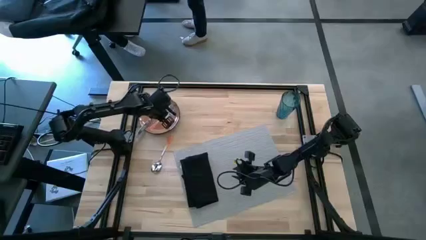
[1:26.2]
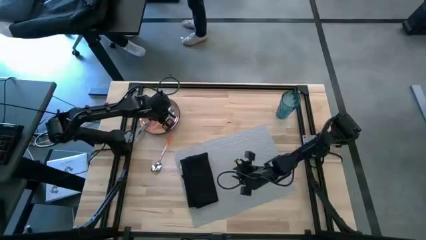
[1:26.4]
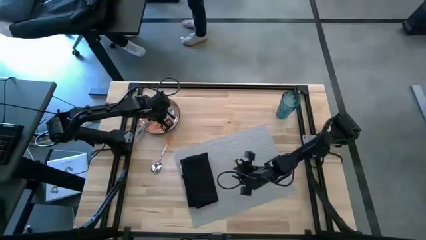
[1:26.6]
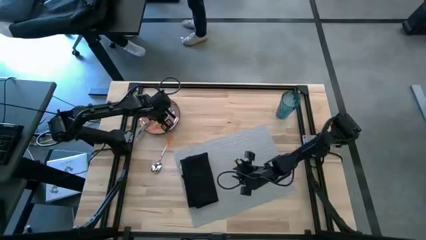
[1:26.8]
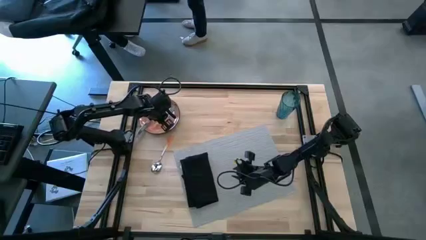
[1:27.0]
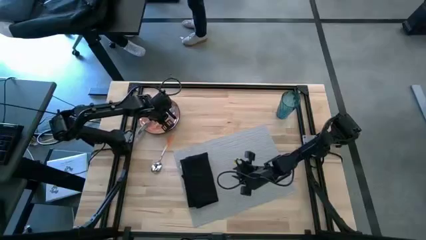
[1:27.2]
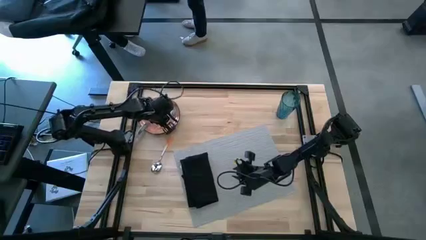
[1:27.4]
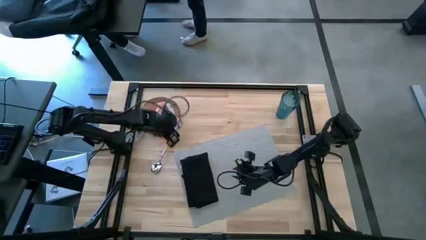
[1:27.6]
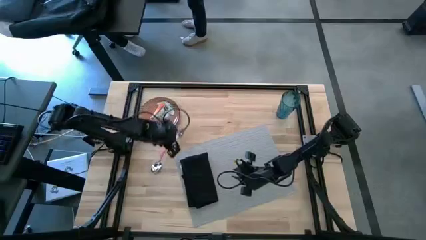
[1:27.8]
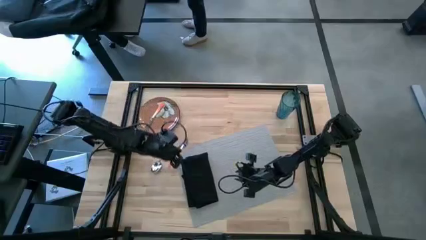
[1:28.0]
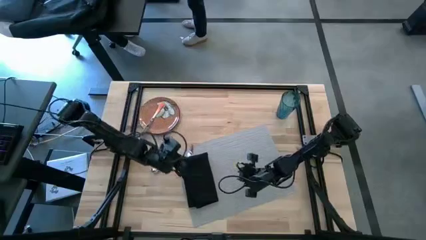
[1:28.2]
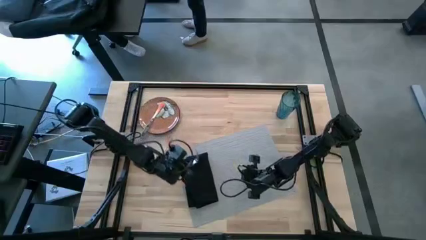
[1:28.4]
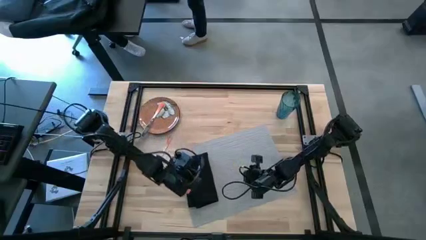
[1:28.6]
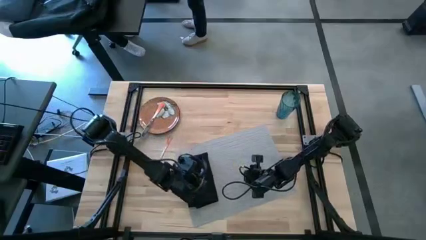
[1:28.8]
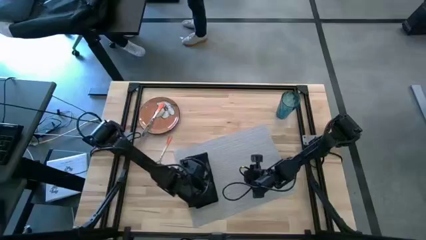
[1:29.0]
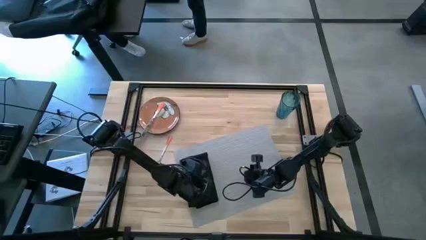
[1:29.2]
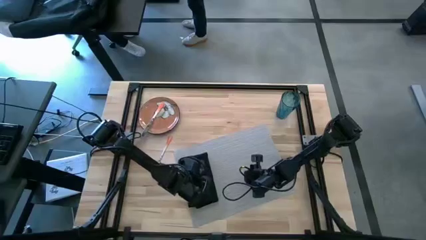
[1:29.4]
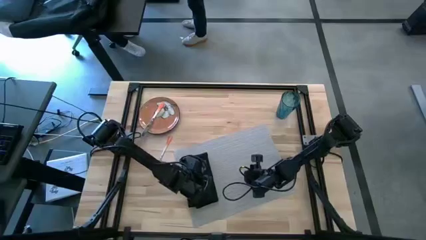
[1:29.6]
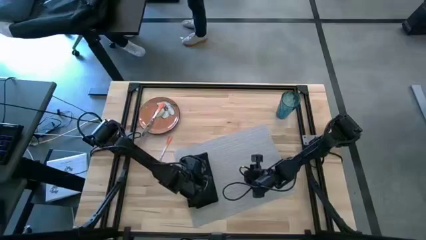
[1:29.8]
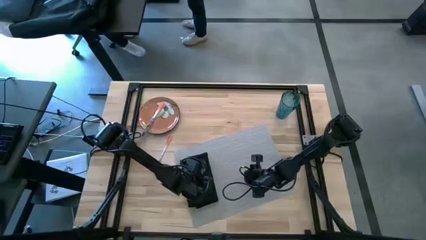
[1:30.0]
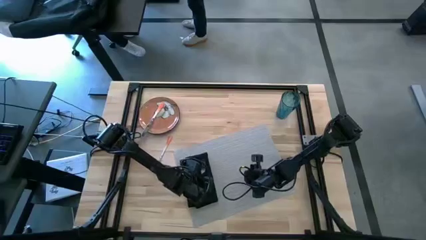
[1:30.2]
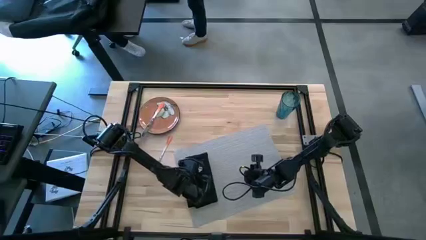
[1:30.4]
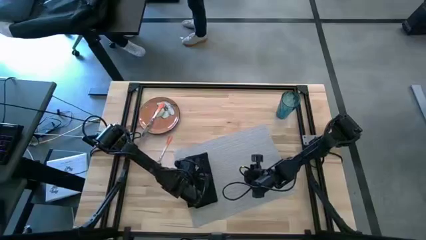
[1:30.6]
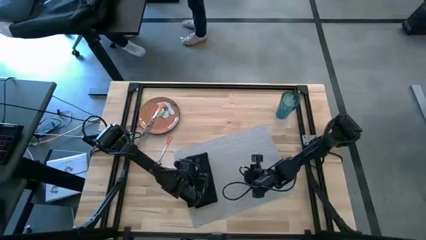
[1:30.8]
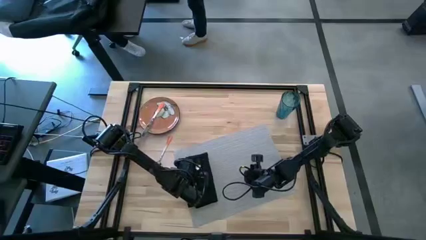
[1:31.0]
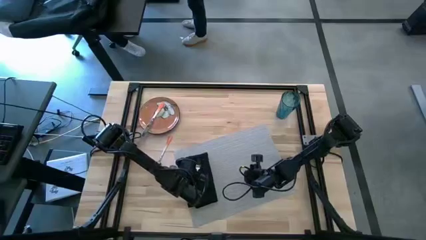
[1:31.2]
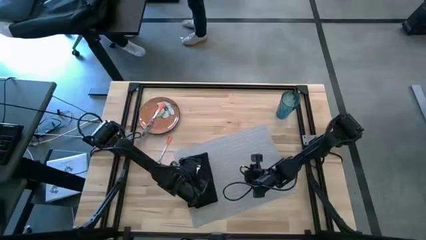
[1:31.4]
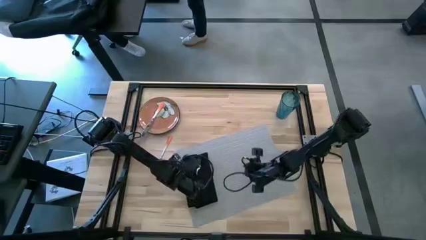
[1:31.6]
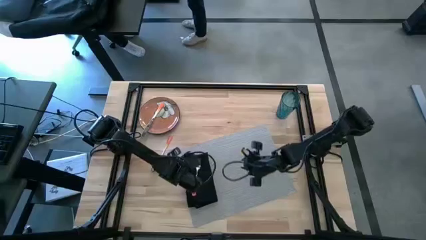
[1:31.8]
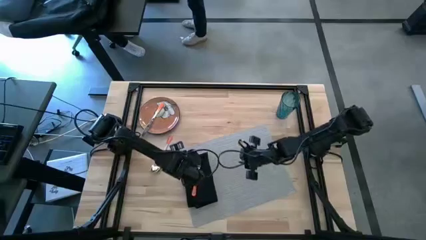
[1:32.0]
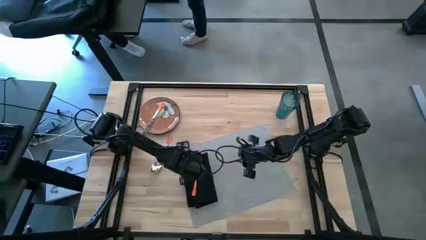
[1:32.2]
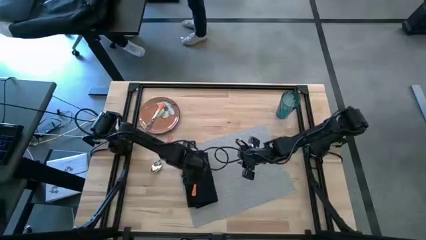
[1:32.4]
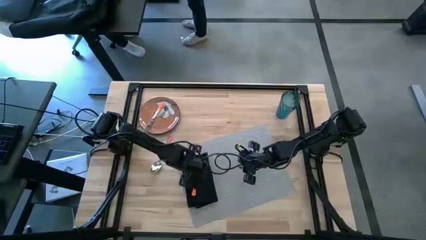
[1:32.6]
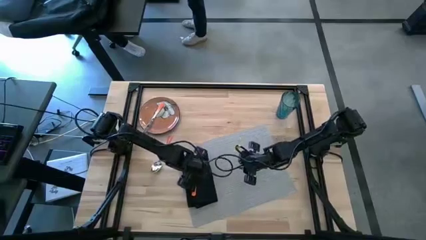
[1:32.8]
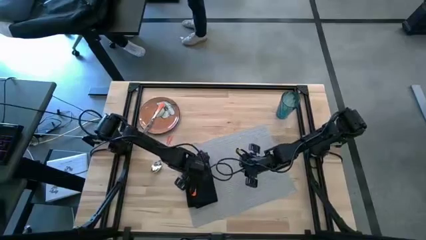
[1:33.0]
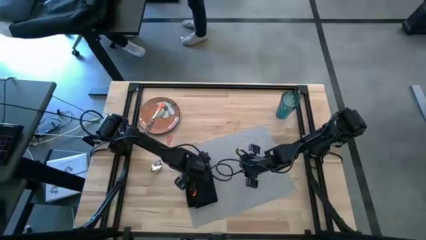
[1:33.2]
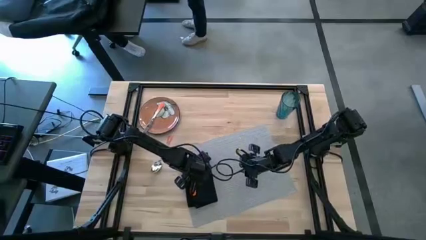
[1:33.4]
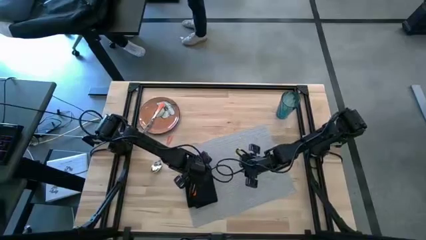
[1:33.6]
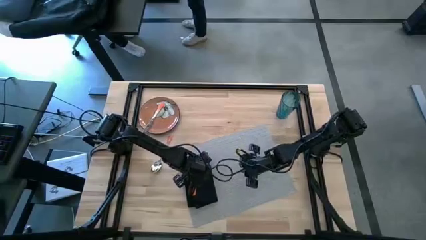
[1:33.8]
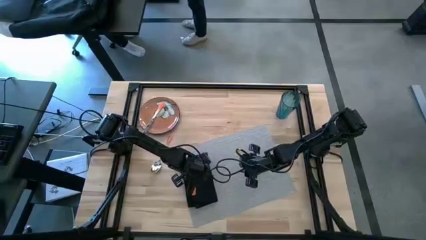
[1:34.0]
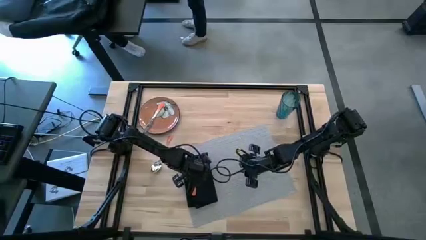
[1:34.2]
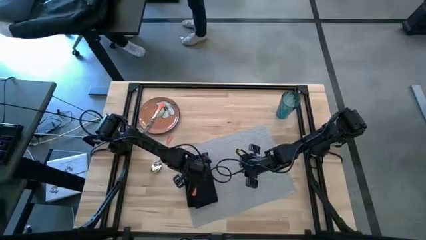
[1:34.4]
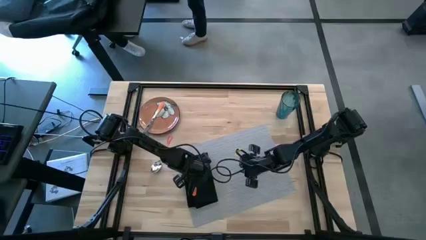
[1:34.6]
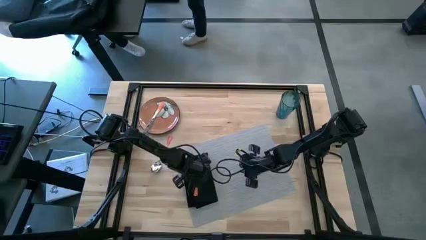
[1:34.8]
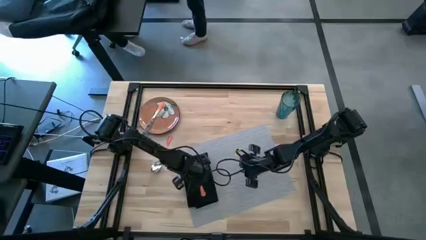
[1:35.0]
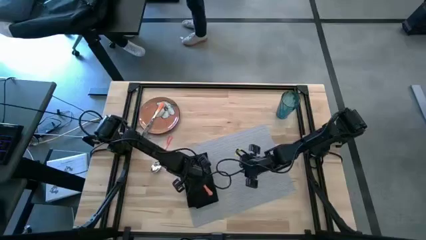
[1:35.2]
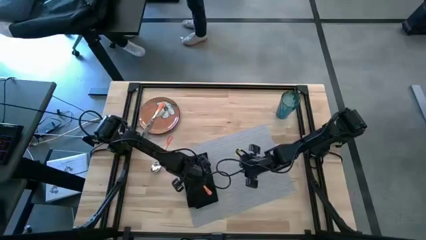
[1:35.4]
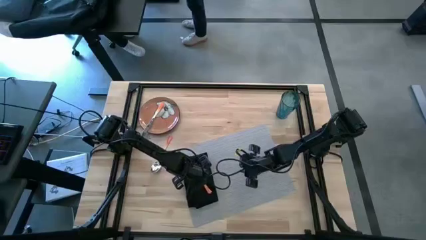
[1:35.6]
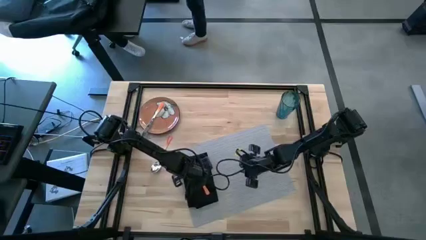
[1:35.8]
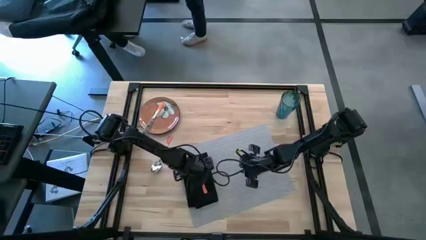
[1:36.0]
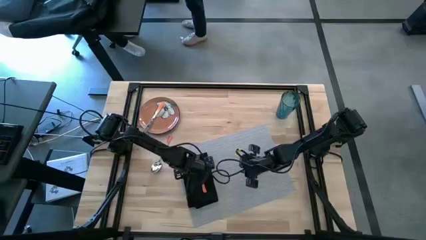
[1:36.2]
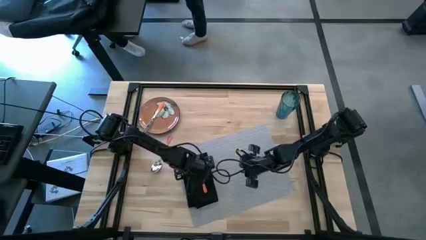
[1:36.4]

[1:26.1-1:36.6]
Task: Set table place
Put the orange fork on the black napkin

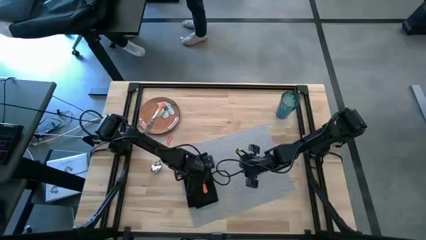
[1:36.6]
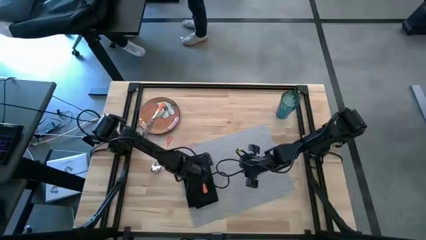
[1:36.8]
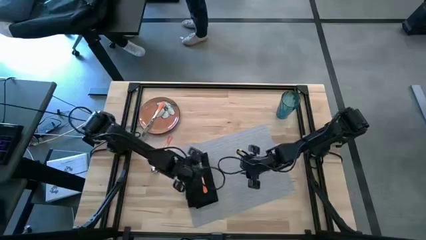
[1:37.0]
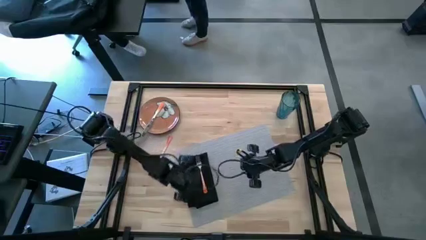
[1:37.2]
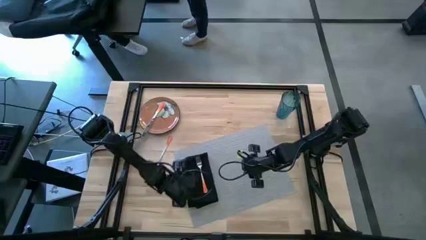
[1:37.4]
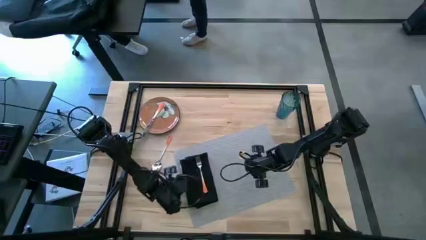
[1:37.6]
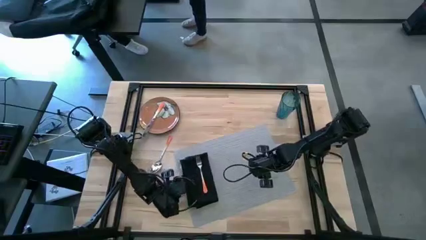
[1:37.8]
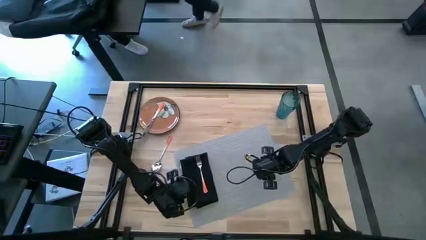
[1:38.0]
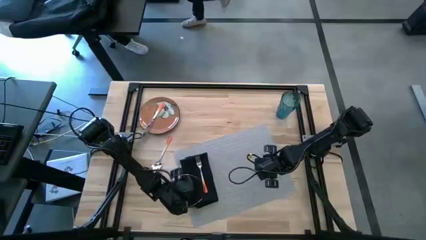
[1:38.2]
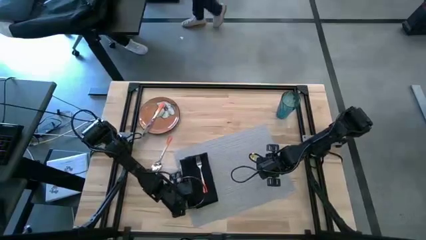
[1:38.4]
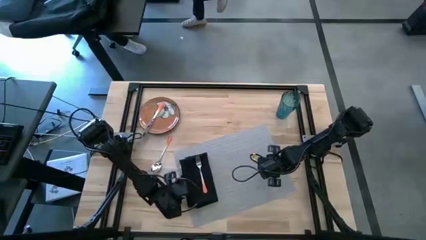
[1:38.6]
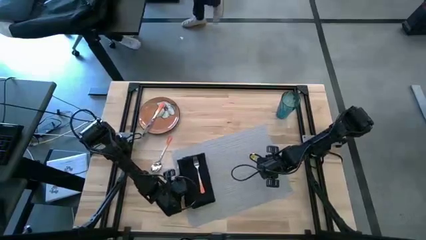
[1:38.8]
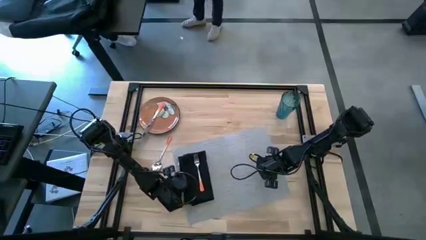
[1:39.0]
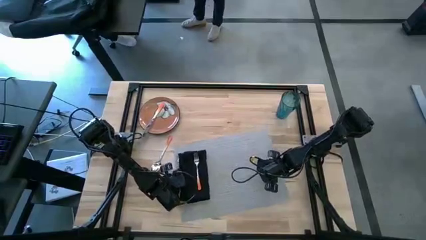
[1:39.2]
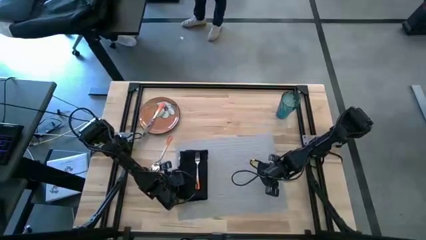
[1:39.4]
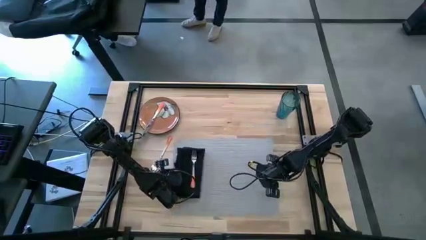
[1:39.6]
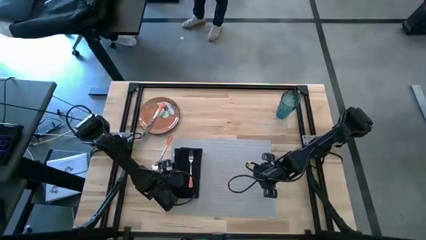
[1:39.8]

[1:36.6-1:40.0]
Adjust the gray placemat

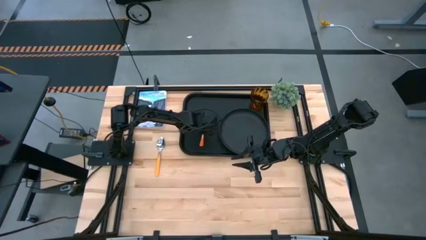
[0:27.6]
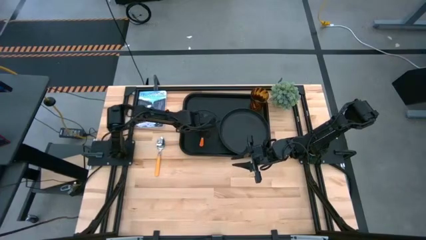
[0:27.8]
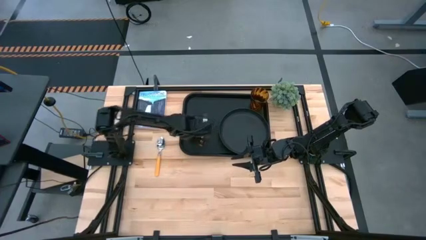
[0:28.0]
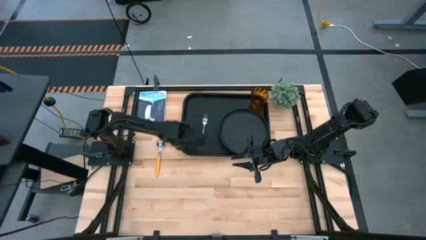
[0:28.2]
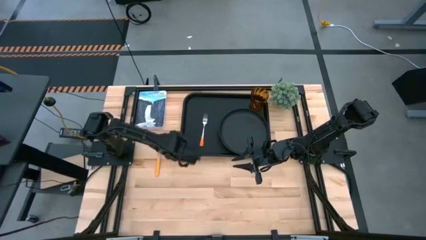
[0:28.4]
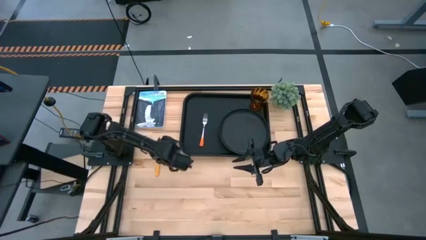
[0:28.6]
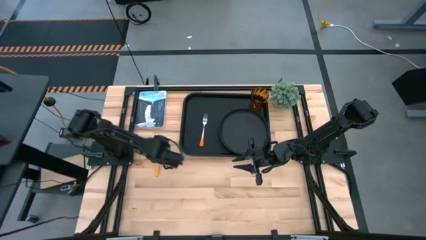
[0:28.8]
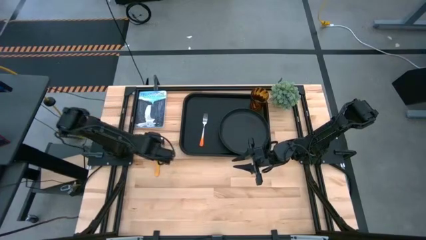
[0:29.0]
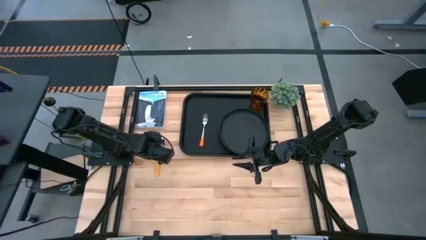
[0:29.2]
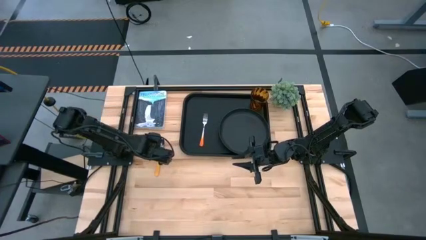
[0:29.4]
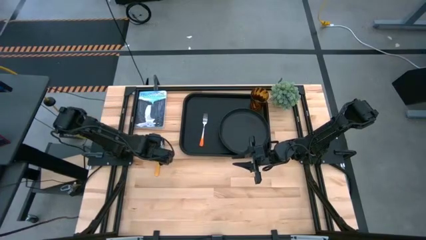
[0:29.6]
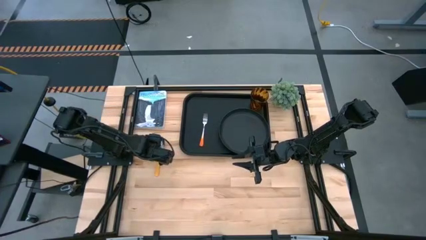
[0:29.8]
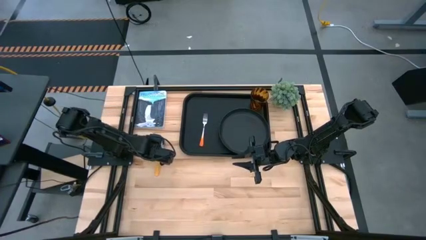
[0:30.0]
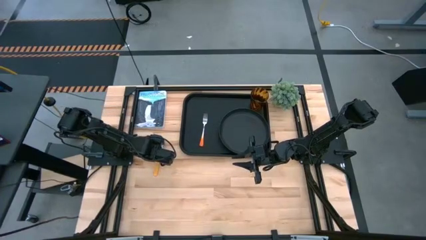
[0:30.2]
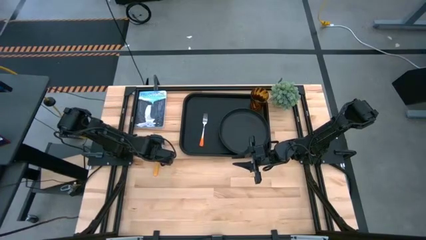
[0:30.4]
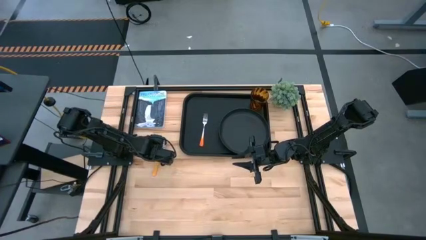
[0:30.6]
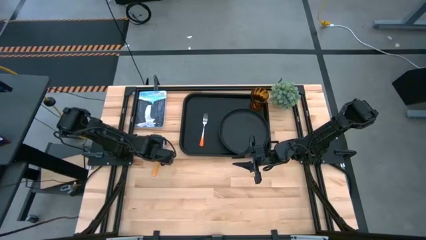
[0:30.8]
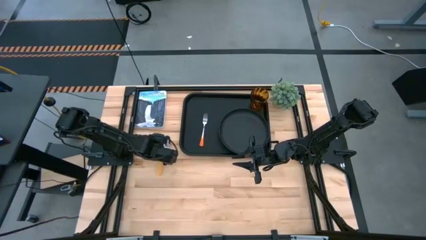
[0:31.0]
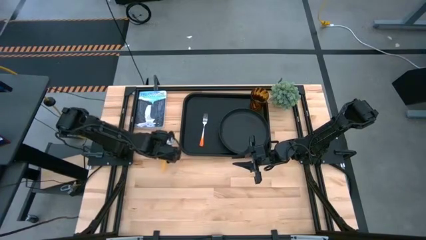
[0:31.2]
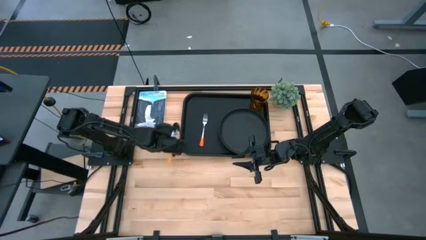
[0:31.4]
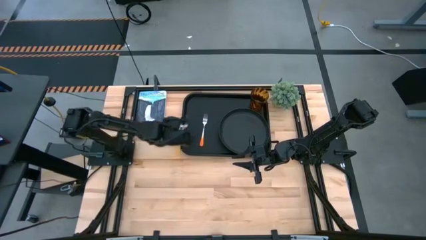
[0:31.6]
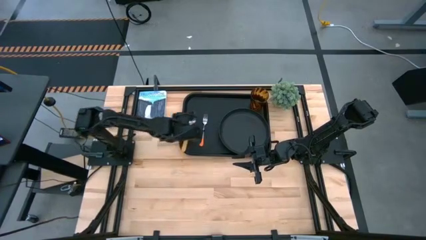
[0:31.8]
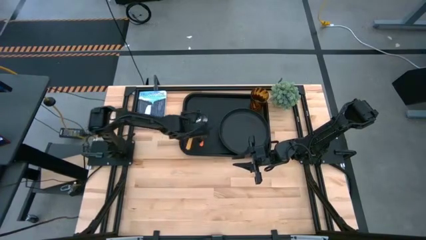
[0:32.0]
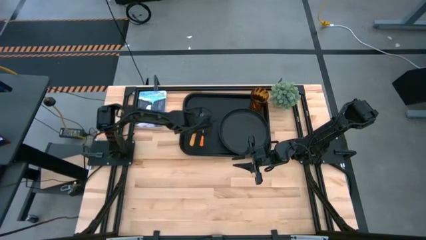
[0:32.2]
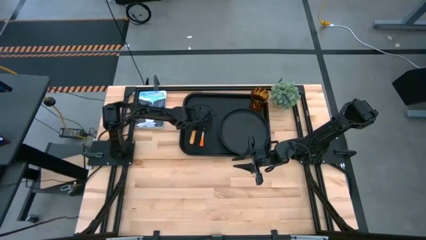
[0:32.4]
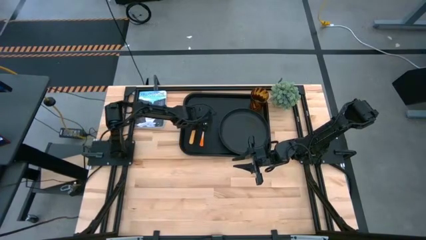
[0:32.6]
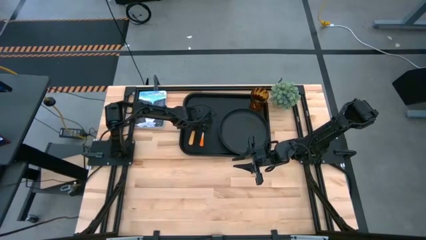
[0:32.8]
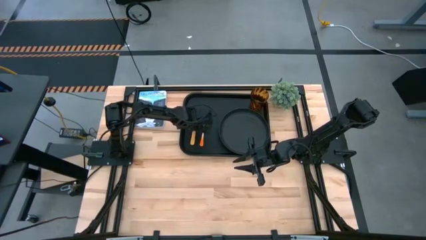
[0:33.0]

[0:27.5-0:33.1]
Task: Pick and place plate/cup/fork/spoon on tray
Put the yellow spoon on the black tray to the left of the orange fork
